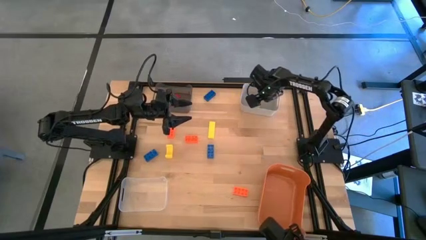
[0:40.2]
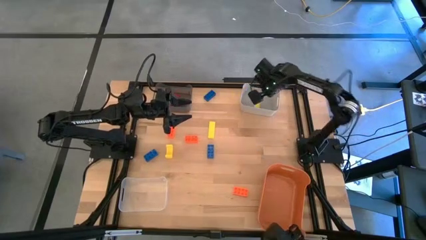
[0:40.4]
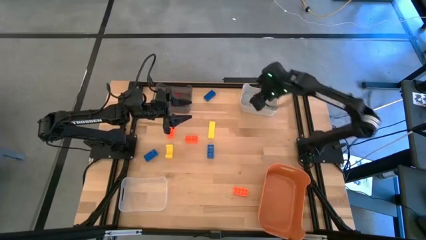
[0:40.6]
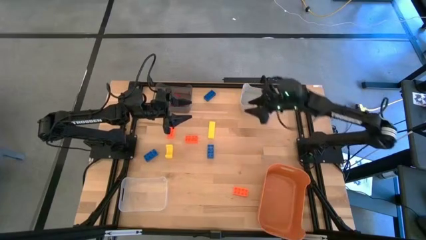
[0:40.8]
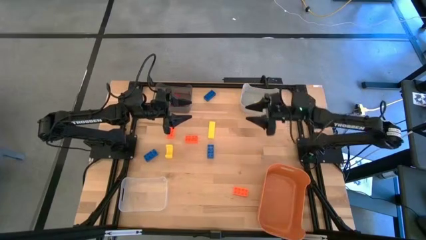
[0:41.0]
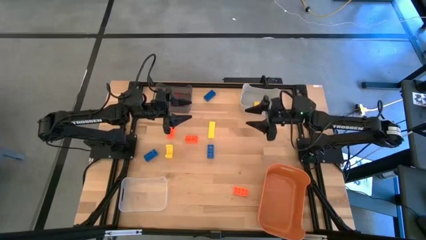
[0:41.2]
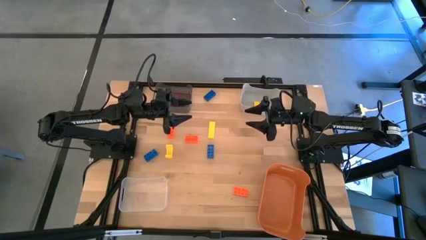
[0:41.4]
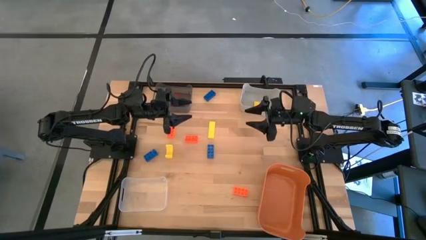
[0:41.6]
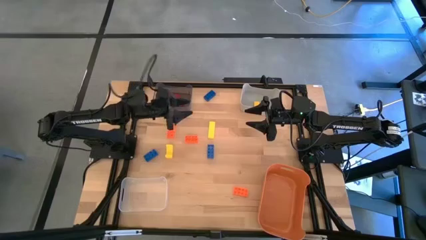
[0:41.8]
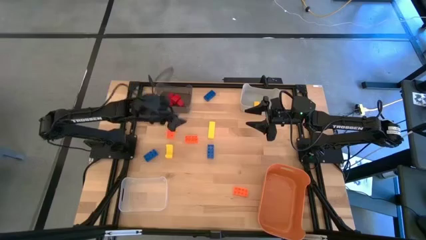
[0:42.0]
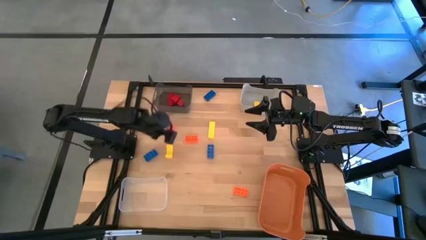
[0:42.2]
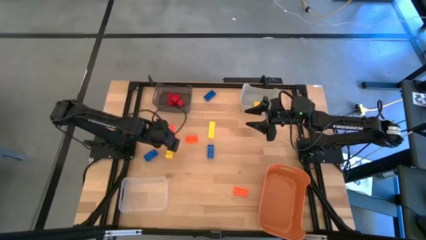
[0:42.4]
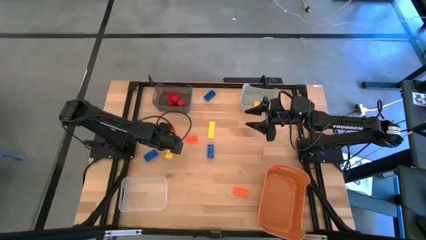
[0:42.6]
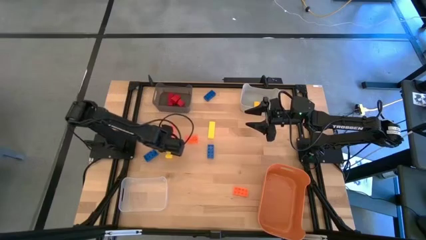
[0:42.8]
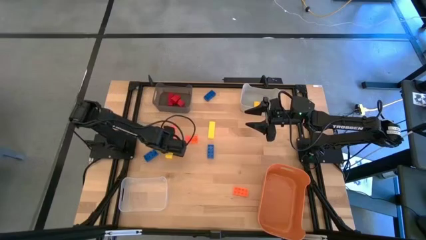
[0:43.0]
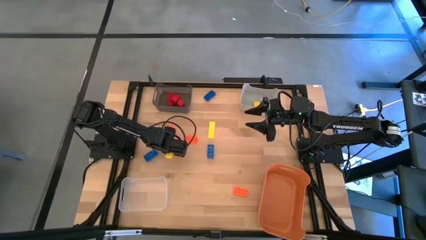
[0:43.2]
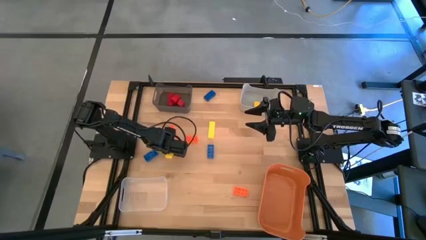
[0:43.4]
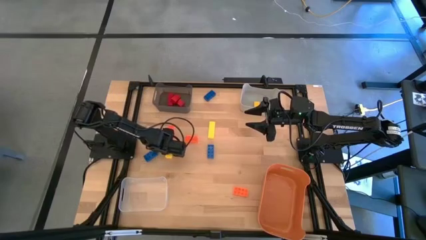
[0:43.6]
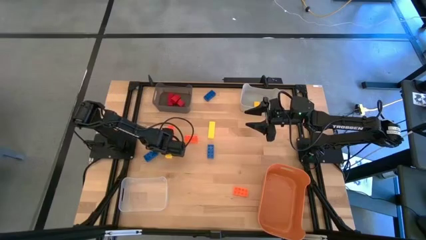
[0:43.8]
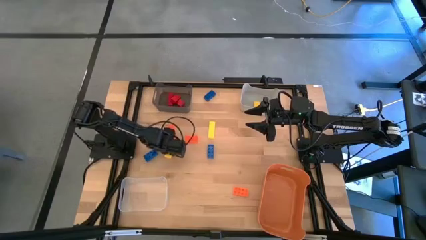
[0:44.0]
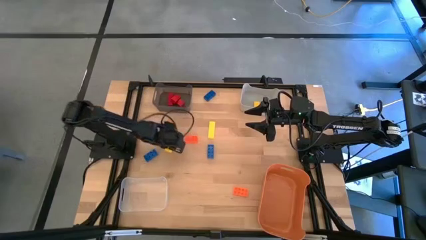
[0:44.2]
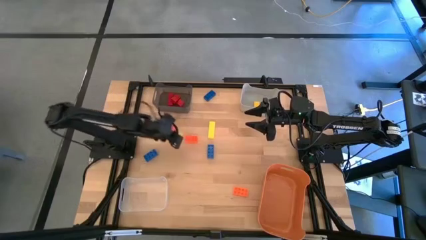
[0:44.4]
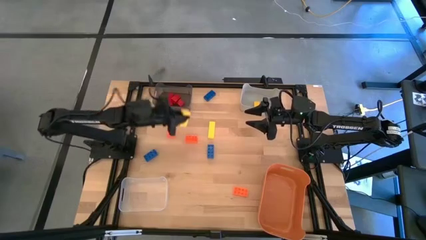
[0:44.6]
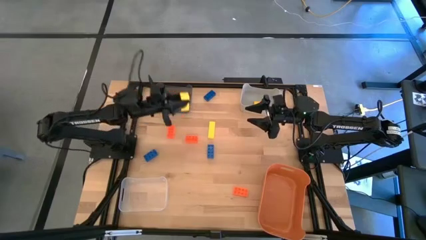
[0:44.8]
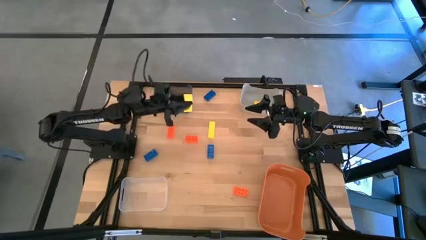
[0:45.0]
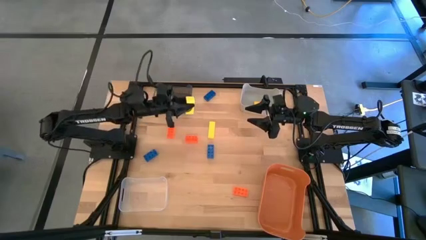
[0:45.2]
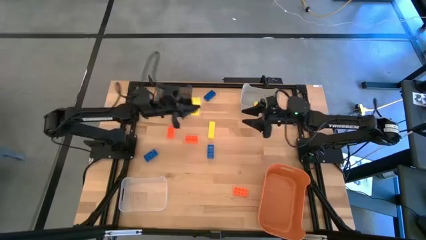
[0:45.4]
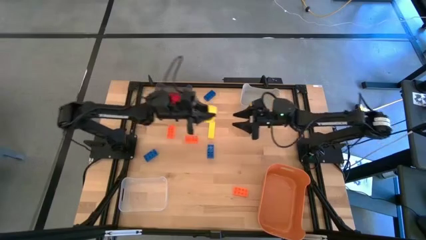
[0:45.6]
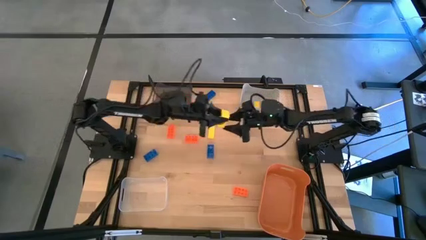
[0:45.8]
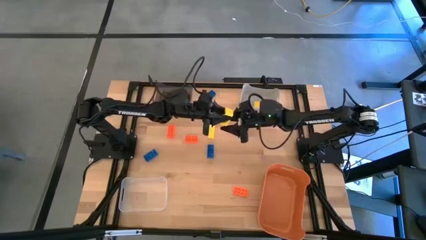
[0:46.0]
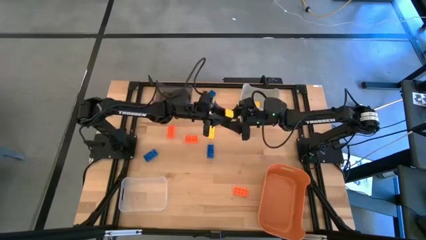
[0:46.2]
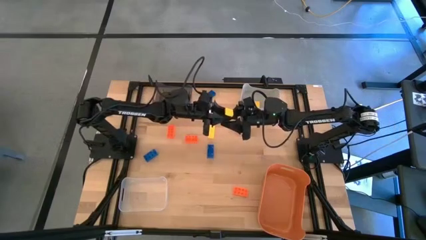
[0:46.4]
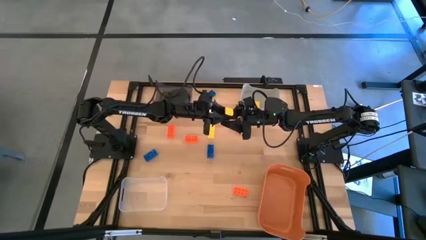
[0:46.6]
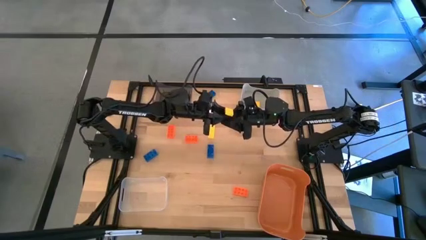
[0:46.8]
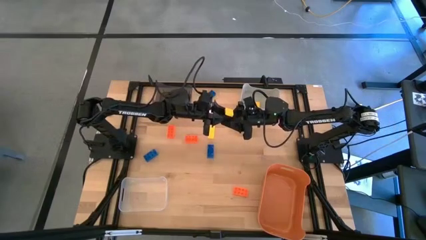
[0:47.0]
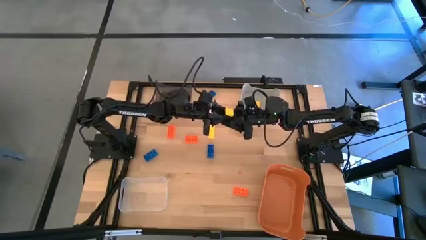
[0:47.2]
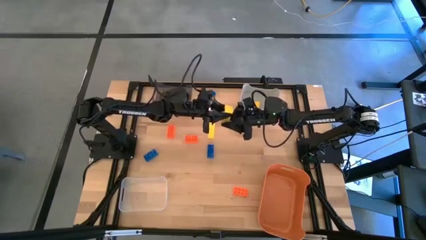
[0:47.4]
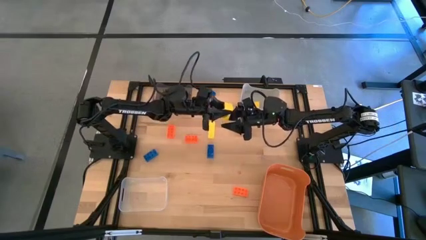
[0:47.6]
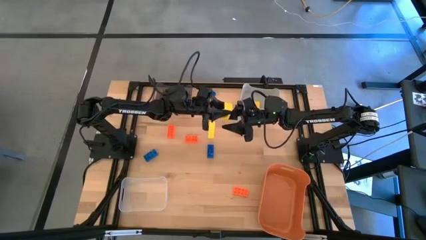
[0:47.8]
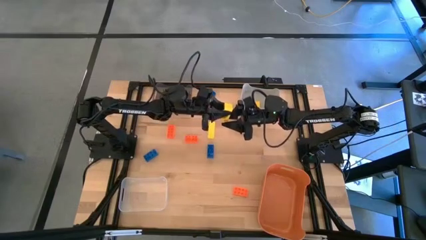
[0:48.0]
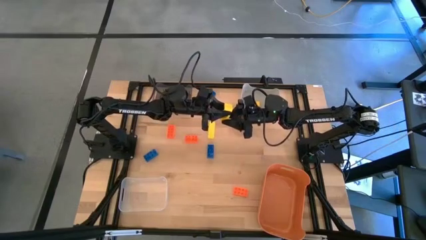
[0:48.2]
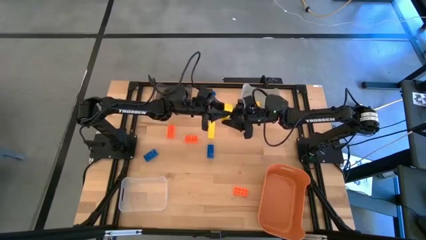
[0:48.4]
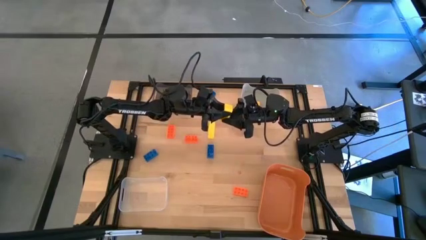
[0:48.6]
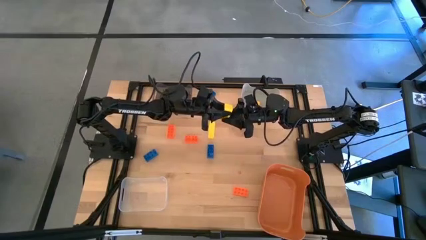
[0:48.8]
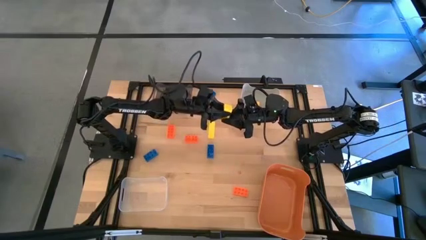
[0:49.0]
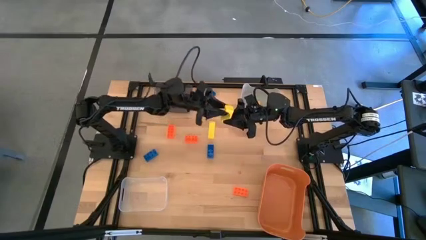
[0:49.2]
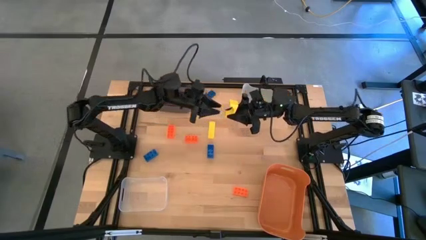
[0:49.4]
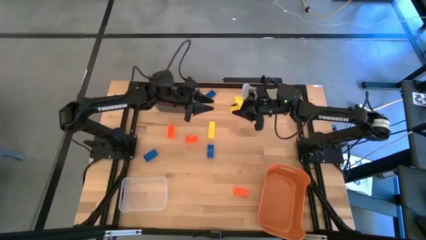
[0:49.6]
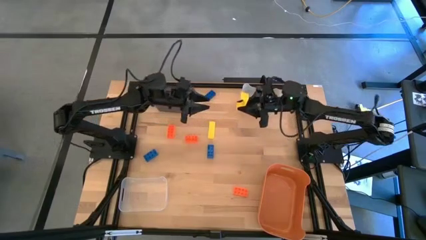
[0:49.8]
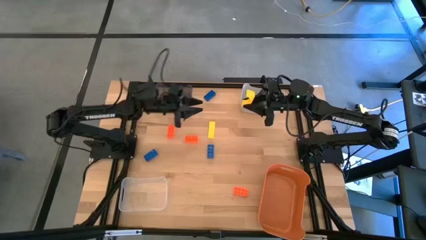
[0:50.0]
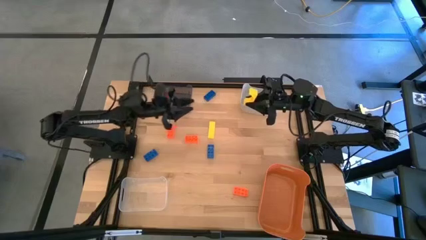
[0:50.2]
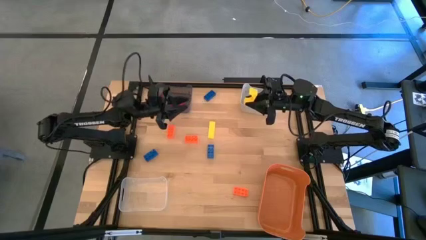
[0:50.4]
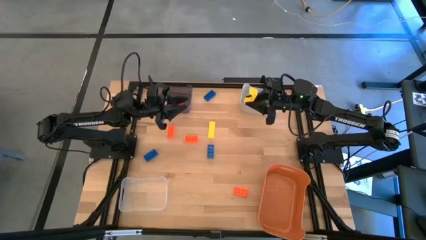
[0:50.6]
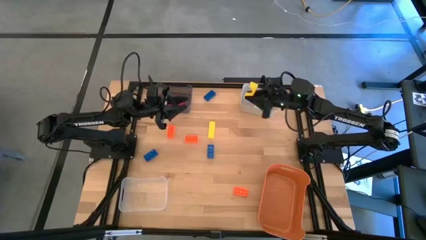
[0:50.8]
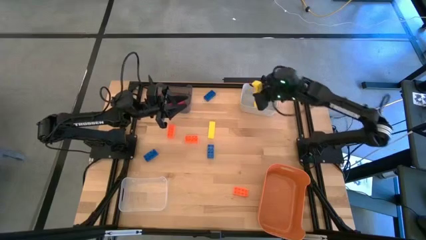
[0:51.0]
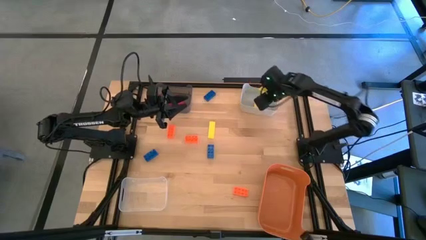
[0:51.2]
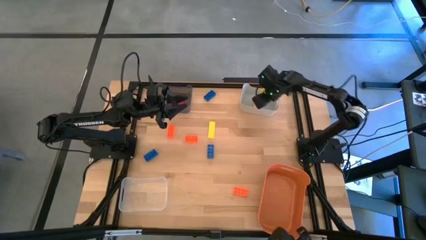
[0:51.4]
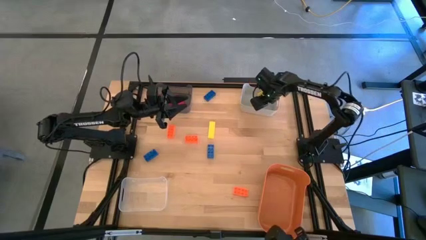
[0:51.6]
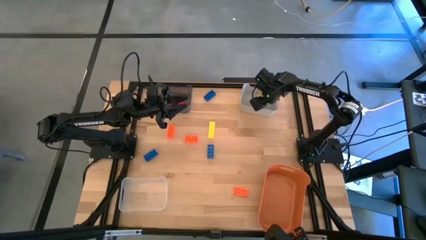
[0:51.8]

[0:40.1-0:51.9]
Task: Sort & place blocks by color
Put the bottom yellow block into the gray bin
